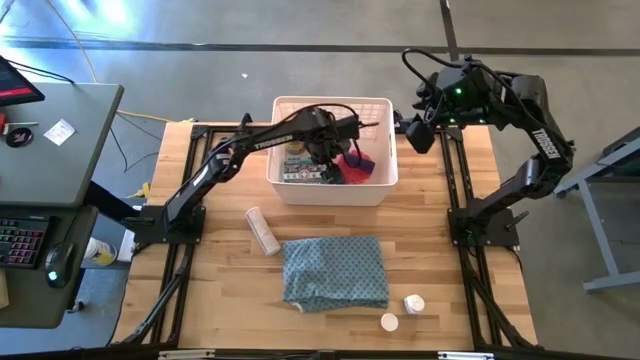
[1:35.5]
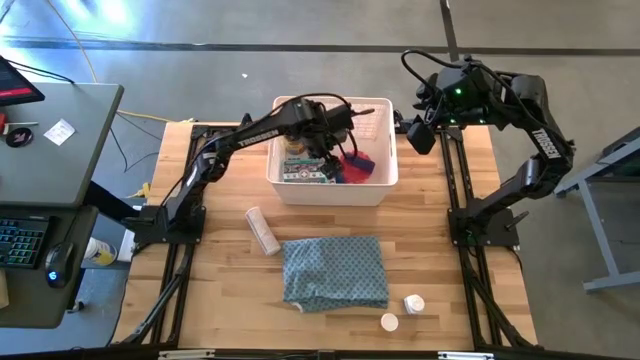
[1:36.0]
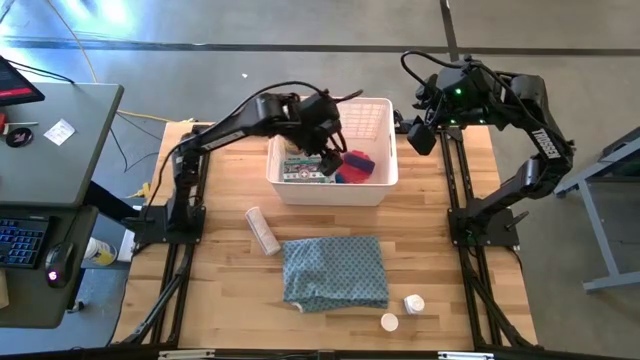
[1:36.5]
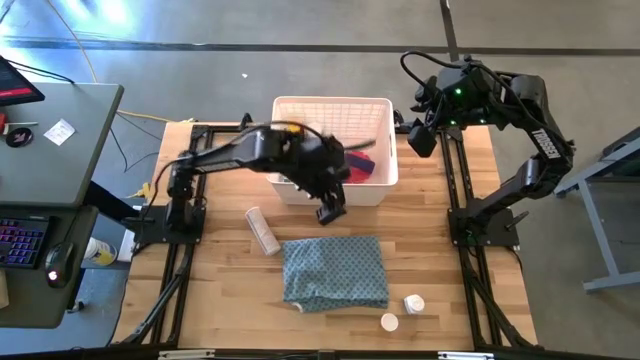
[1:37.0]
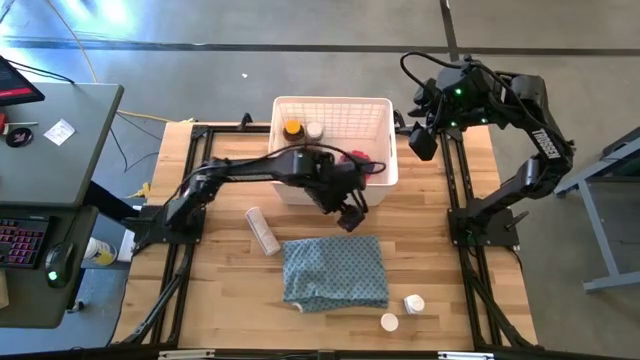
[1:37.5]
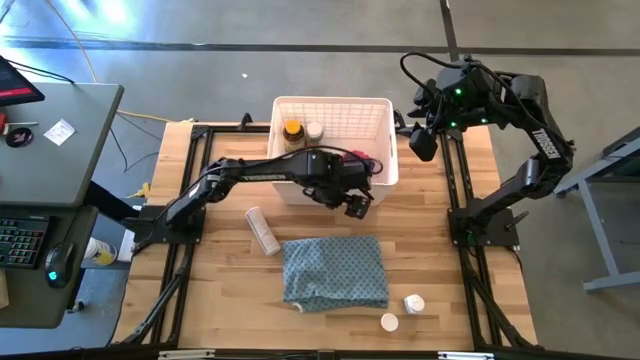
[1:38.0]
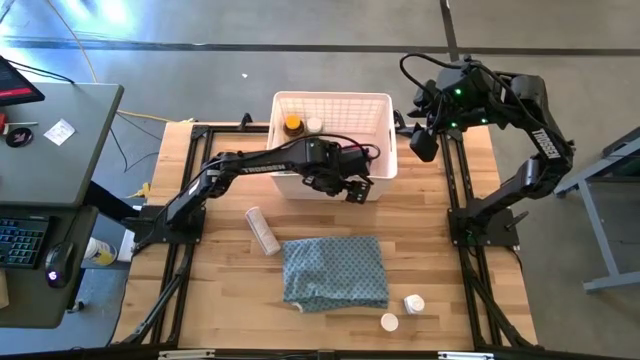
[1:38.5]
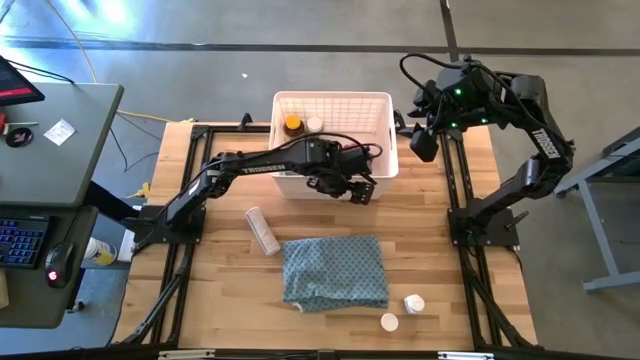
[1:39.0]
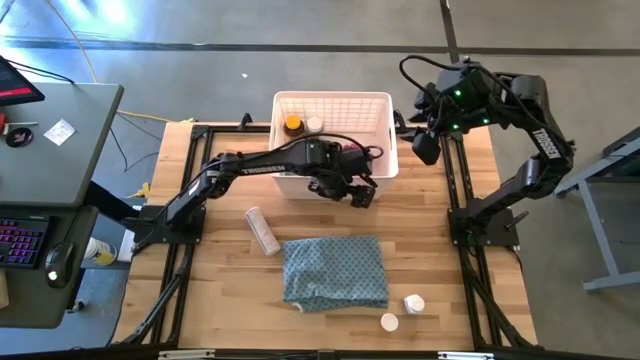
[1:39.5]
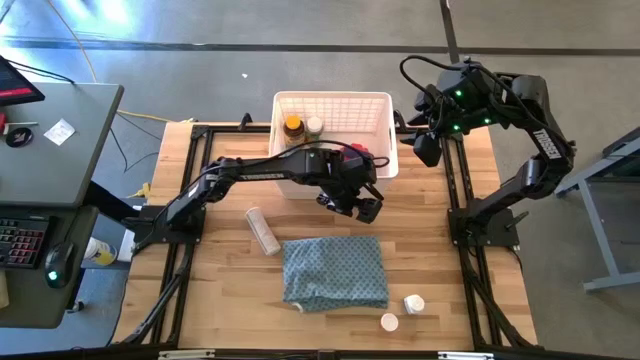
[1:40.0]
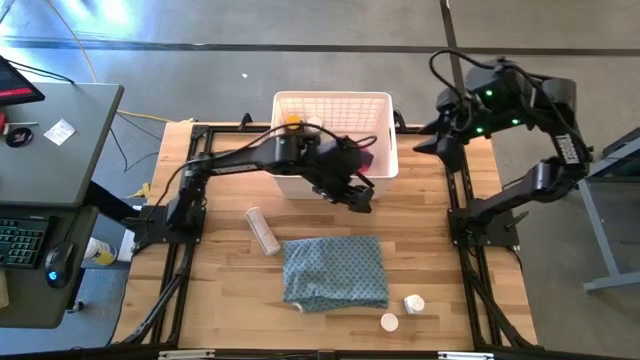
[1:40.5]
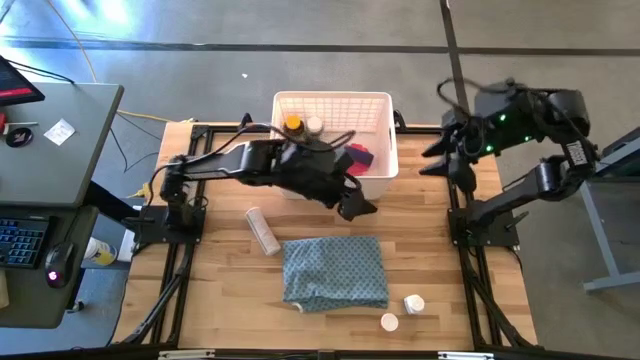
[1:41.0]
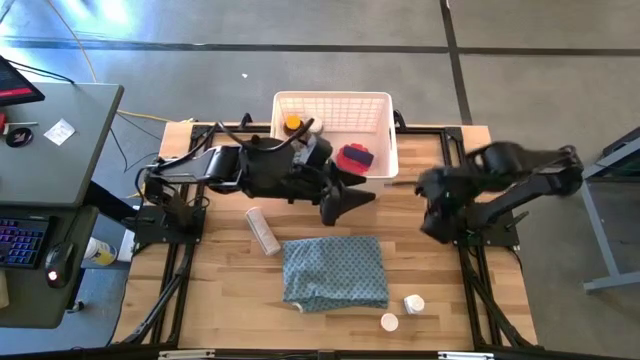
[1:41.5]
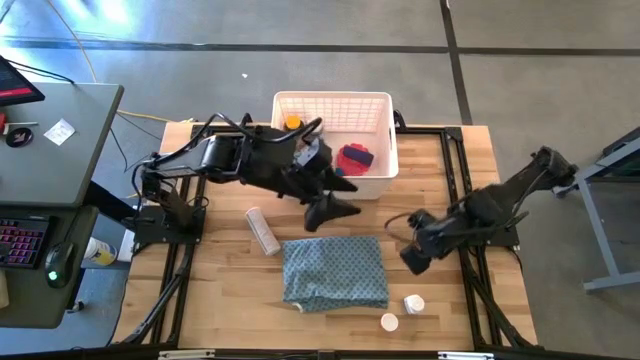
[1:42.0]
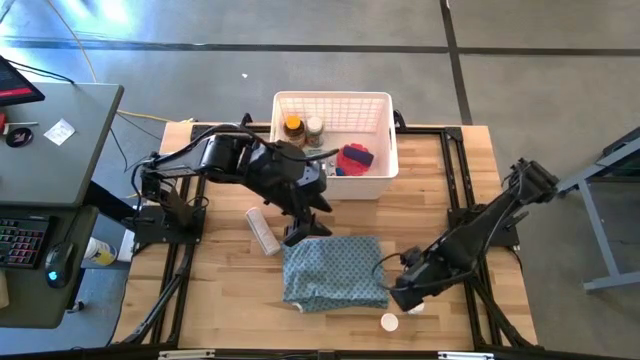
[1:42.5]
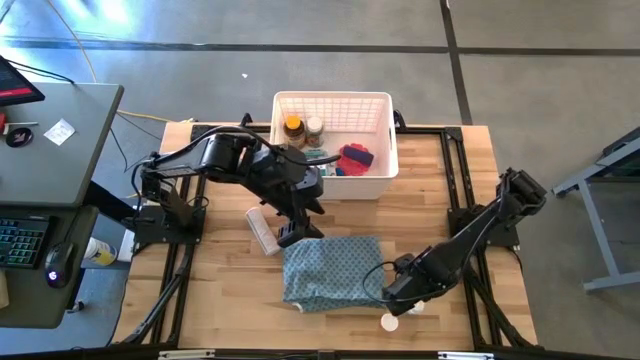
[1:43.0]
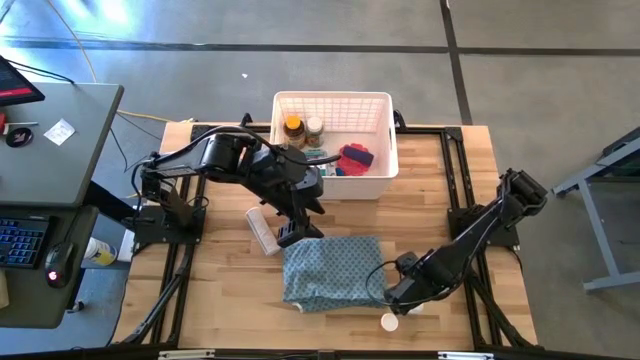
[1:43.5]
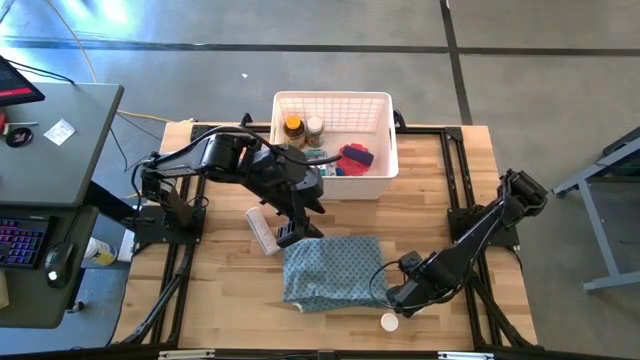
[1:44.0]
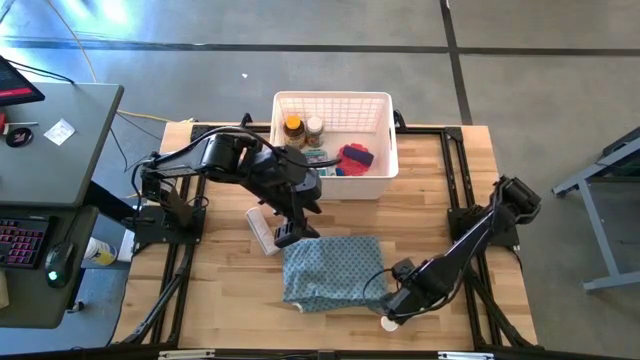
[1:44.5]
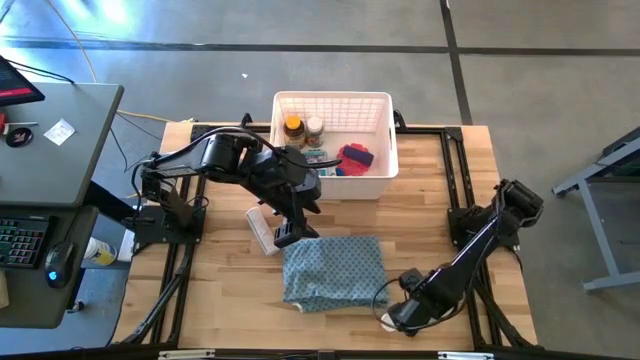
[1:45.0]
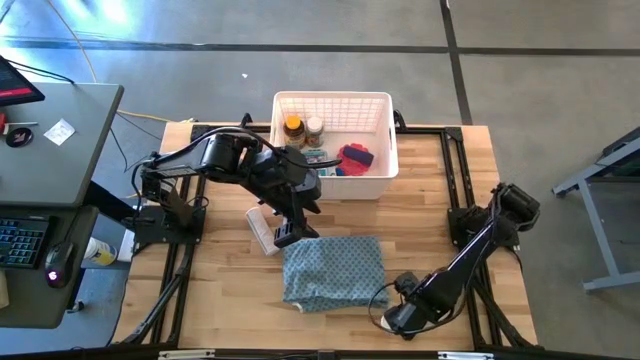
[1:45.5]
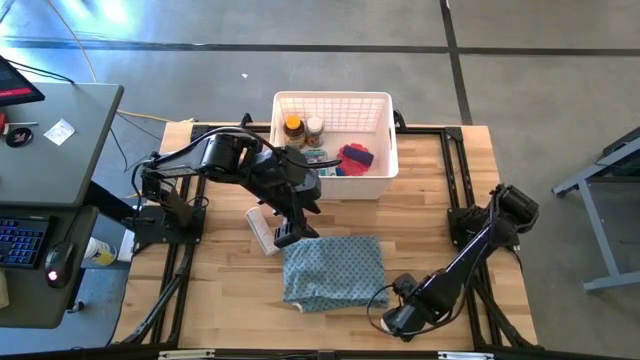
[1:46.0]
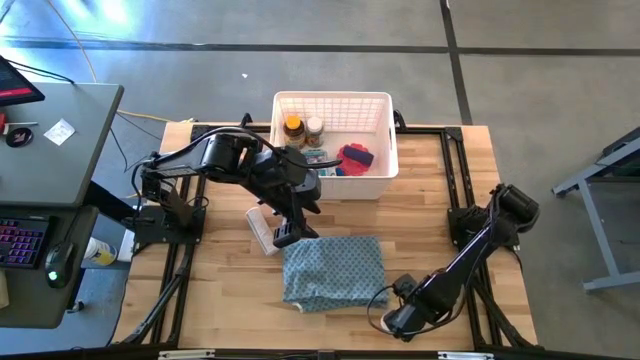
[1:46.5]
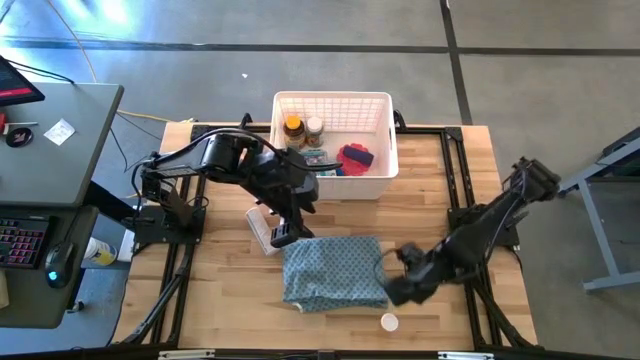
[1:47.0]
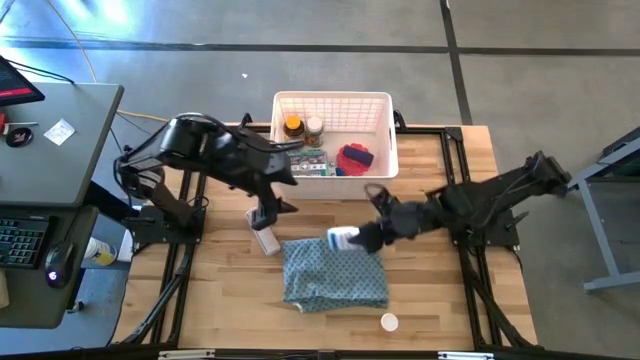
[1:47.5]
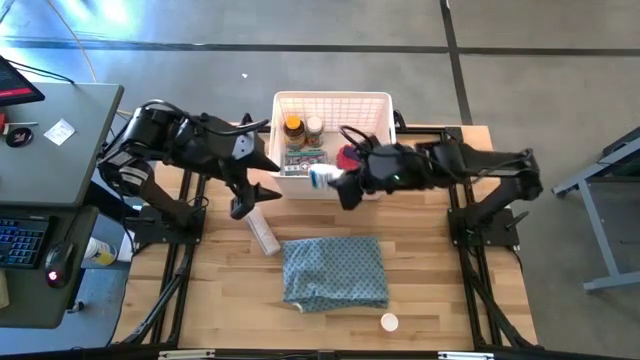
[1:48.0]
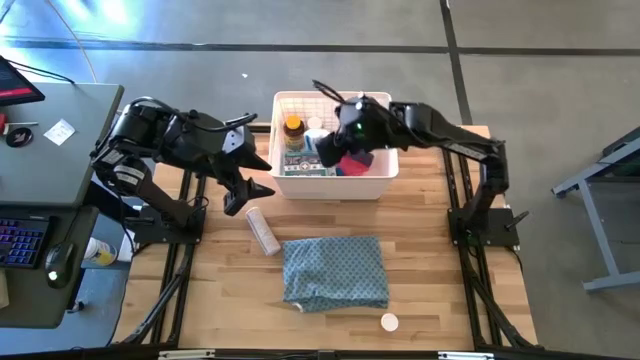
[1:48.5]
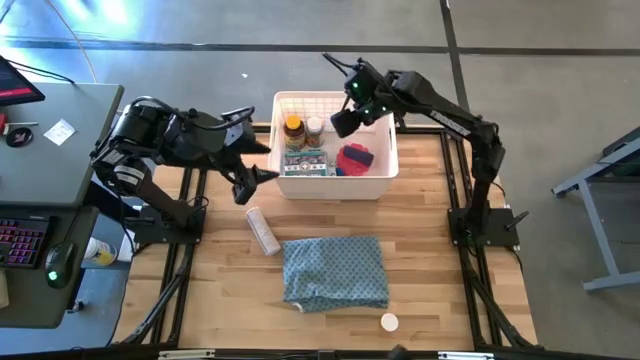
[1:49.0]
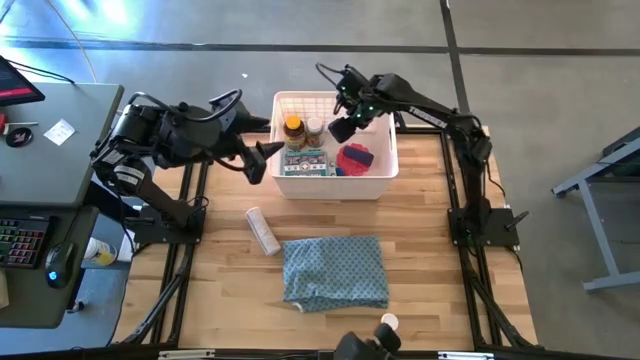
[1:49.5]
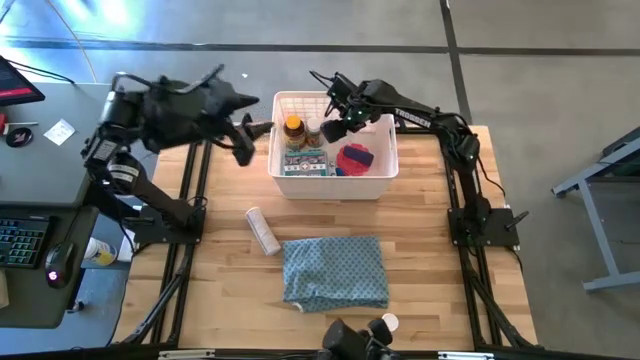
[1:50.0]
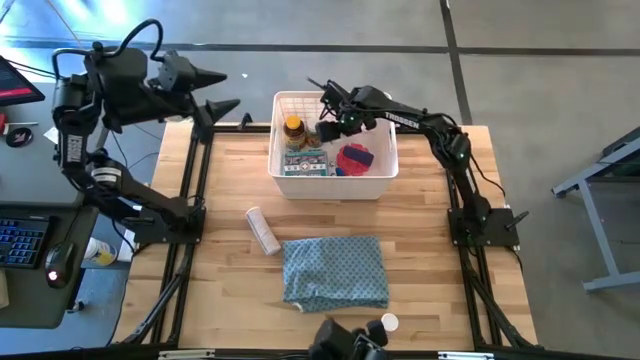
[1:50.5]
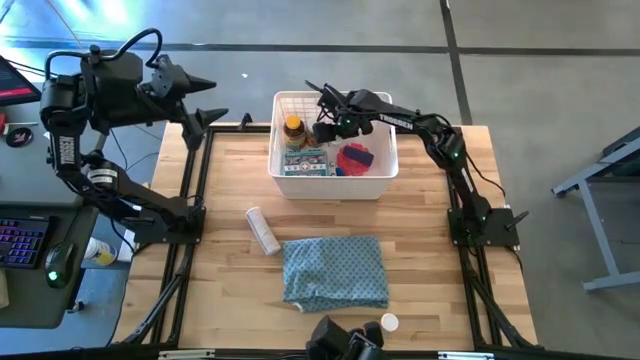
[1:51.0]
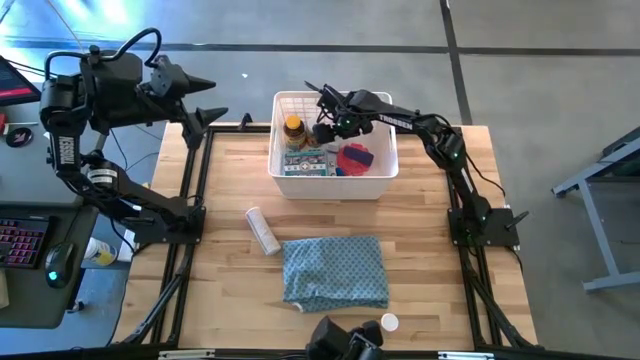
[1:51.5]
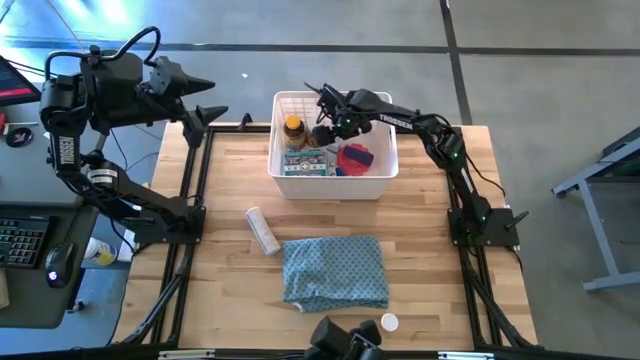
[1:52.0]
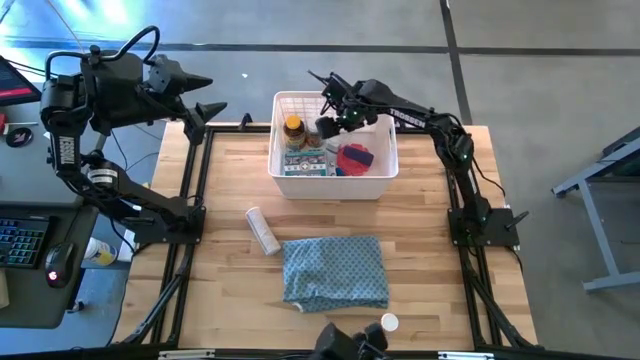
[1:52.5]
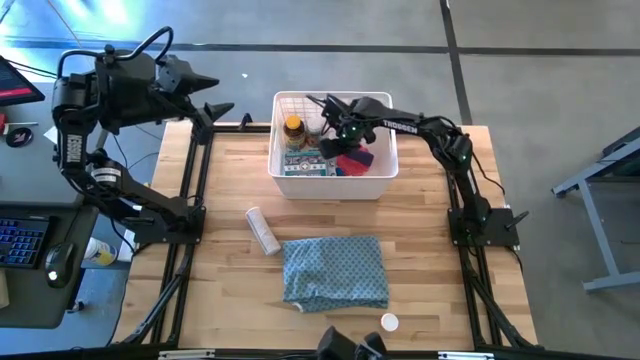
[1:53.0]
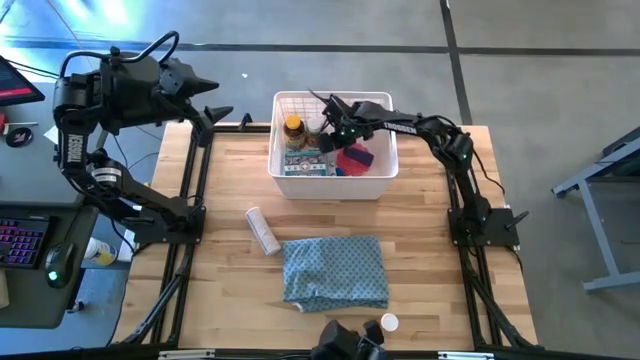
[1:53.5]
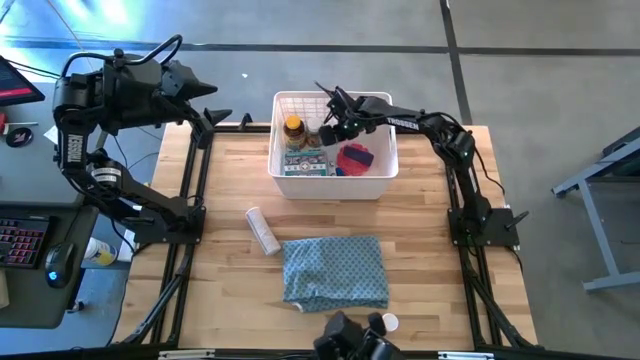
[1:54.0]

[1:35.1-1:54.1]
Task: Pick & place medical supplies in basket/bin
Put the white pill bottle into the white bin

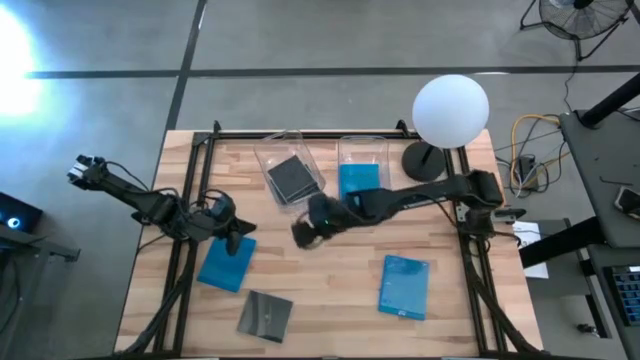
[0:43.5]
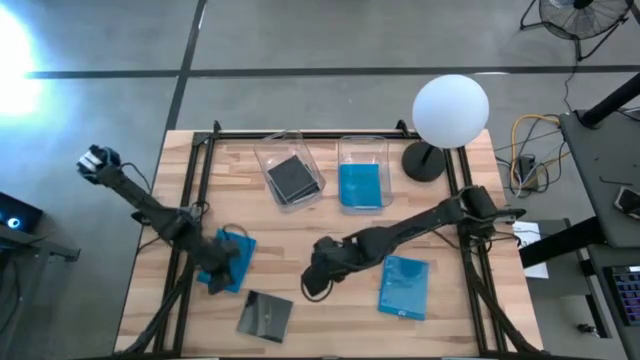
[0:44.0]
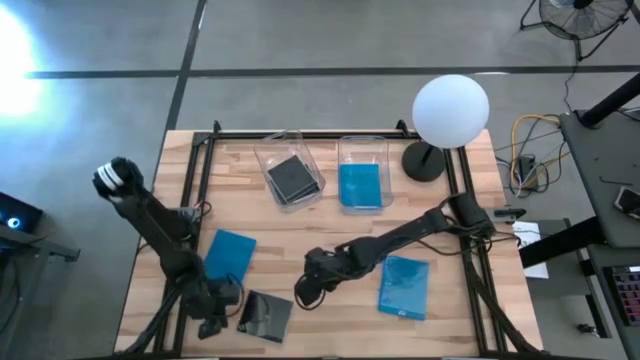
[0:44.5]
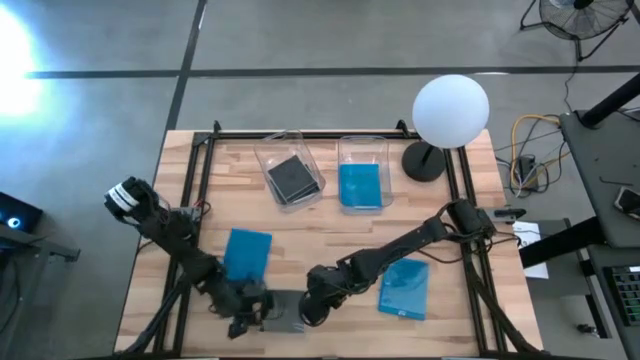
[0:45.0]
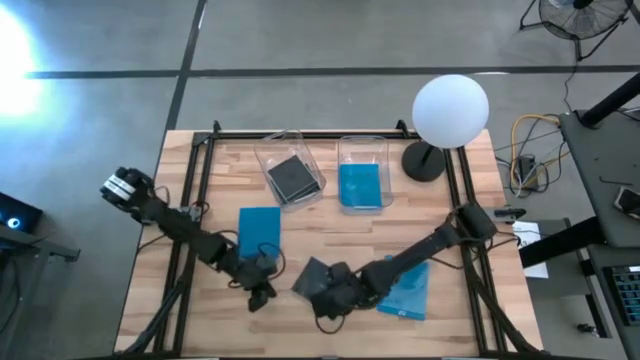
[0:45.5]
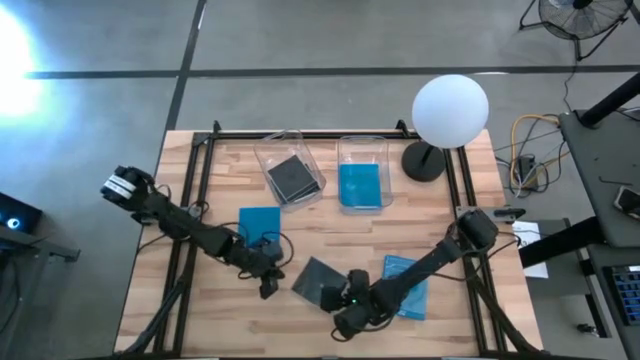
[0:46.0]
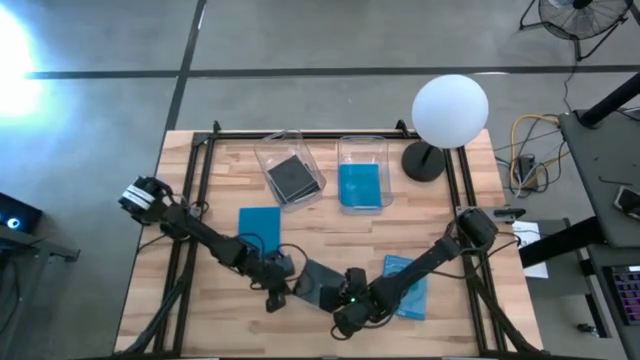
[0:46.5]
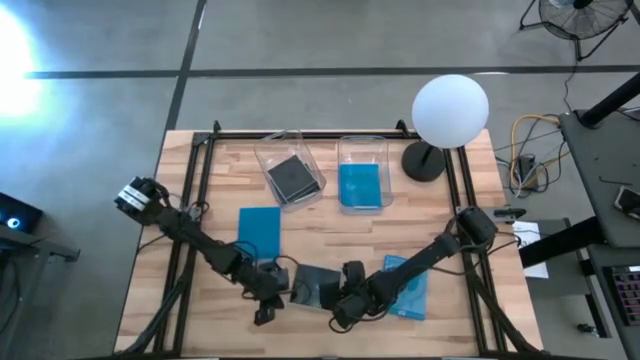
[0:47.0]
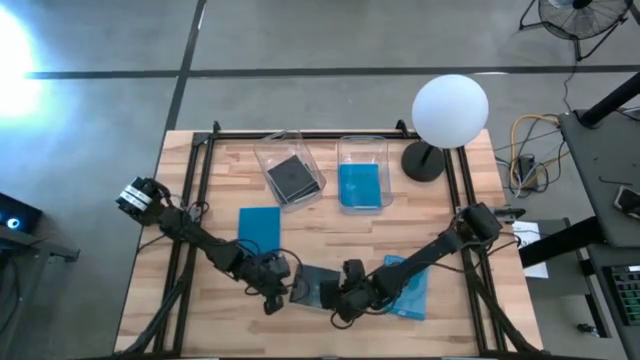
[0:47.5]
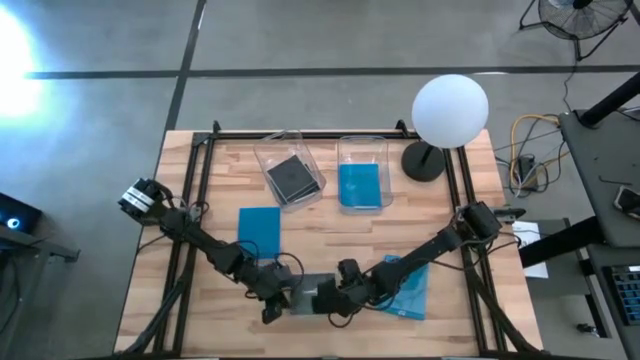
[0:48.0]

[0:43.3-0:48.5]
Task: Pick & place jewel cases by type
Put the black CD case on the table into the left transparent bin
